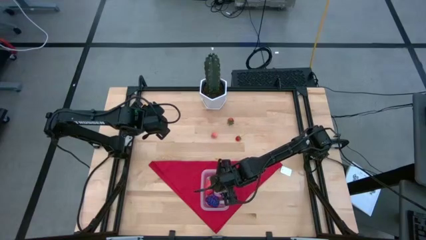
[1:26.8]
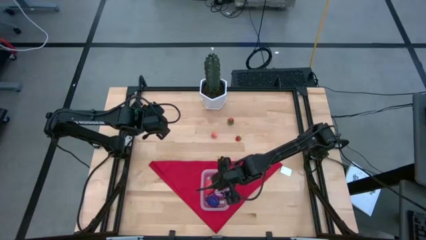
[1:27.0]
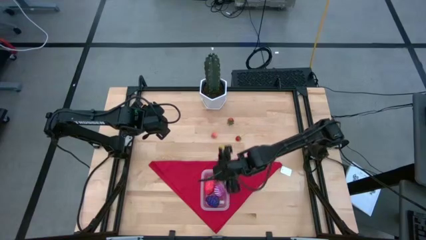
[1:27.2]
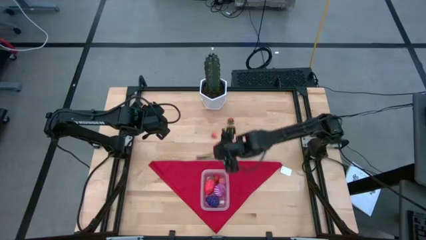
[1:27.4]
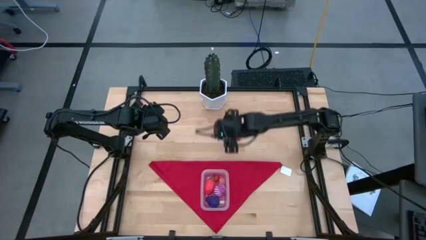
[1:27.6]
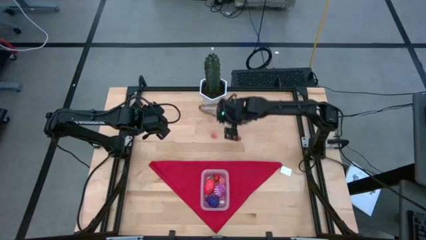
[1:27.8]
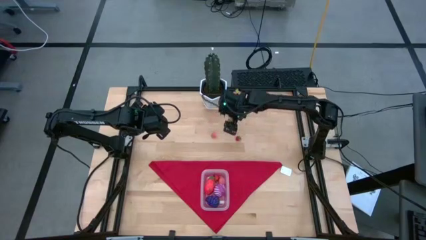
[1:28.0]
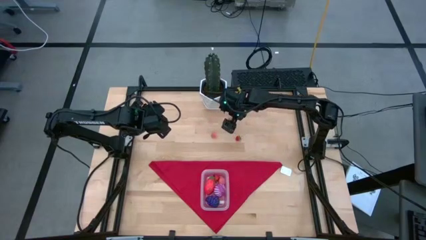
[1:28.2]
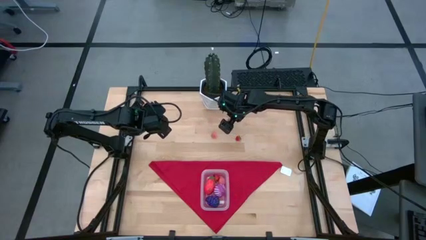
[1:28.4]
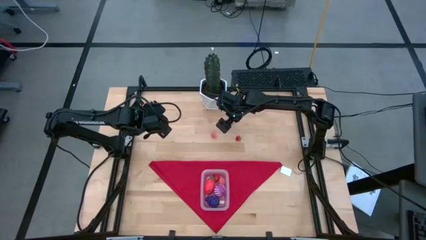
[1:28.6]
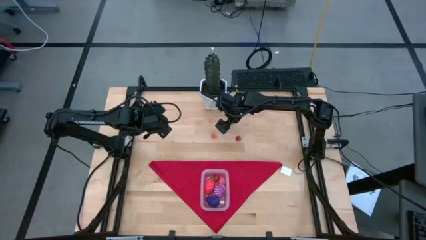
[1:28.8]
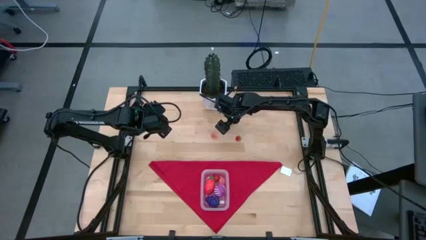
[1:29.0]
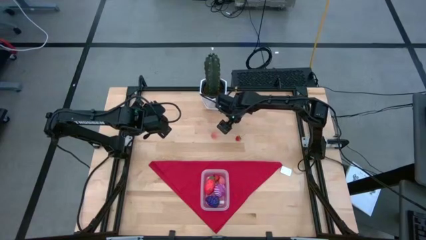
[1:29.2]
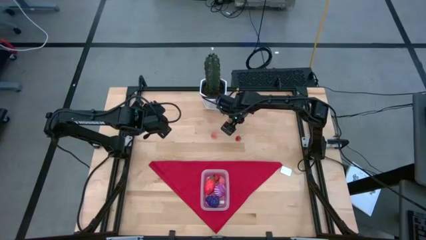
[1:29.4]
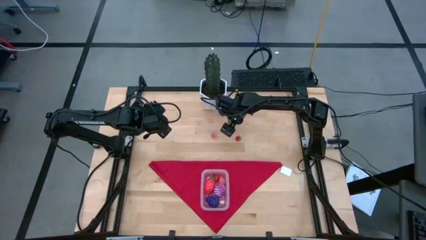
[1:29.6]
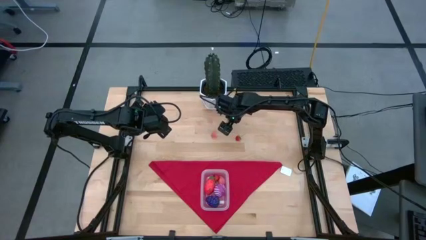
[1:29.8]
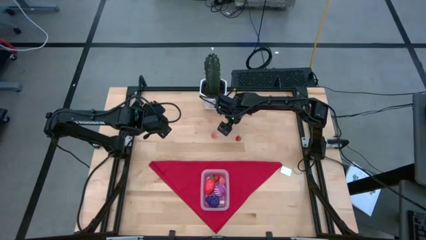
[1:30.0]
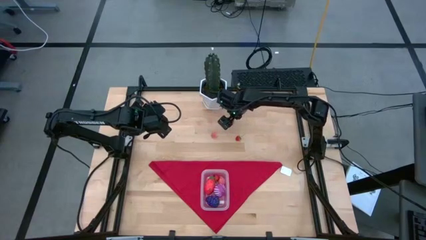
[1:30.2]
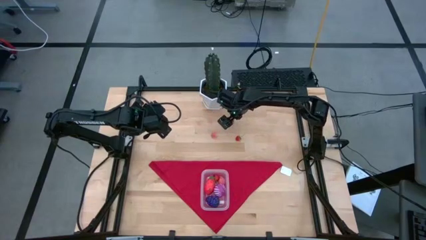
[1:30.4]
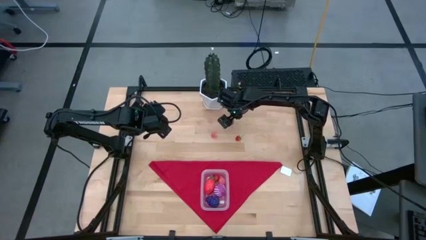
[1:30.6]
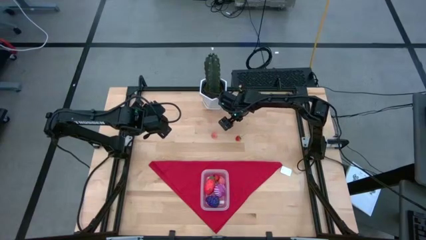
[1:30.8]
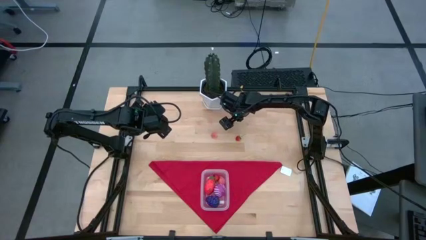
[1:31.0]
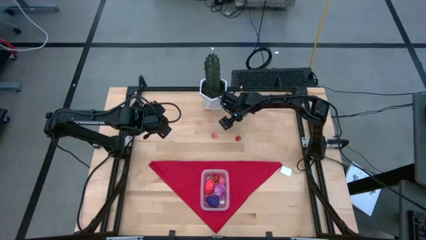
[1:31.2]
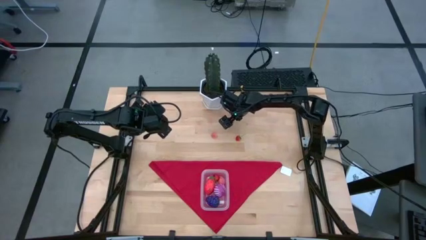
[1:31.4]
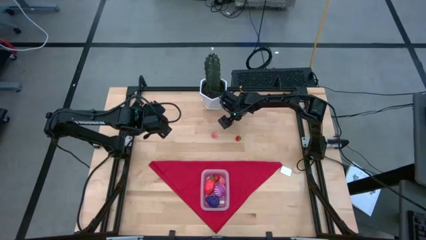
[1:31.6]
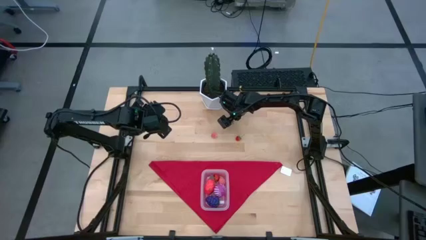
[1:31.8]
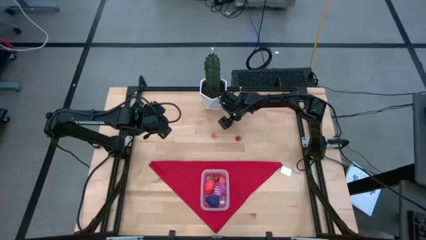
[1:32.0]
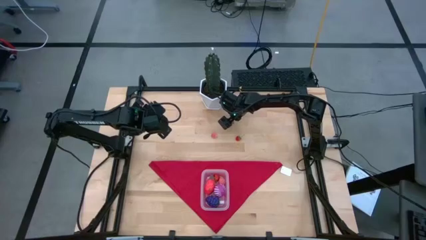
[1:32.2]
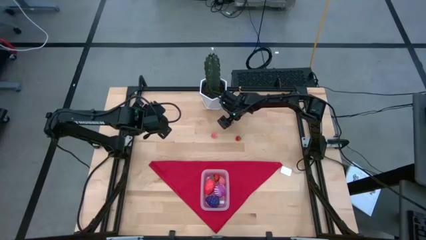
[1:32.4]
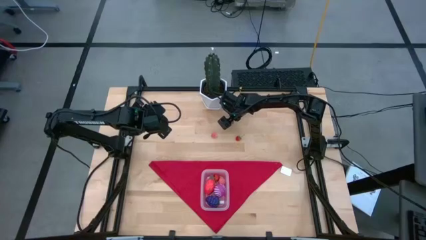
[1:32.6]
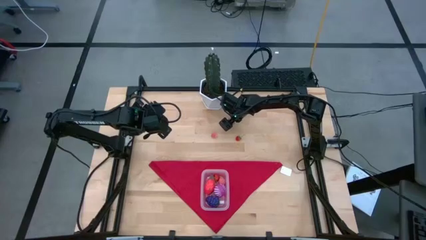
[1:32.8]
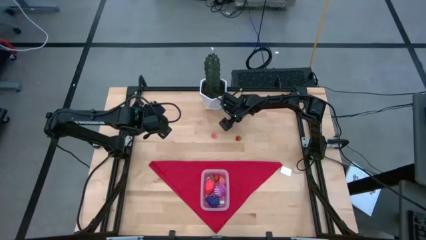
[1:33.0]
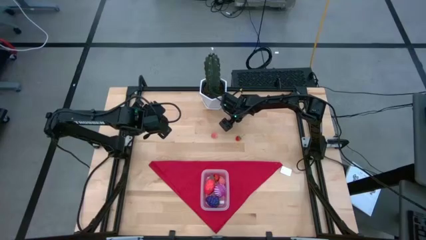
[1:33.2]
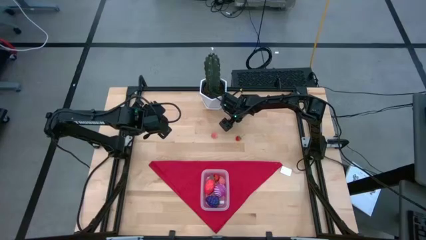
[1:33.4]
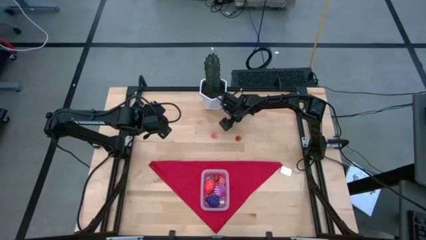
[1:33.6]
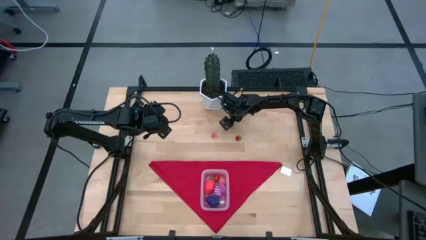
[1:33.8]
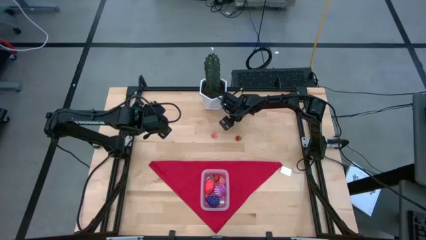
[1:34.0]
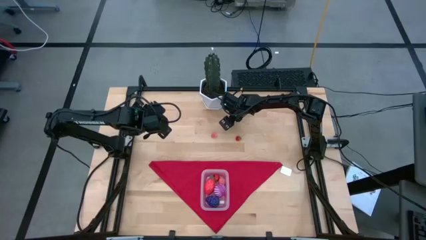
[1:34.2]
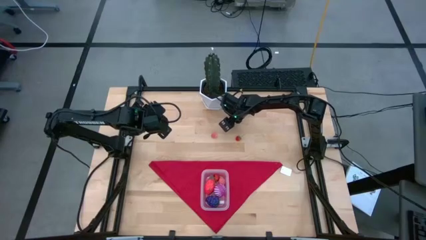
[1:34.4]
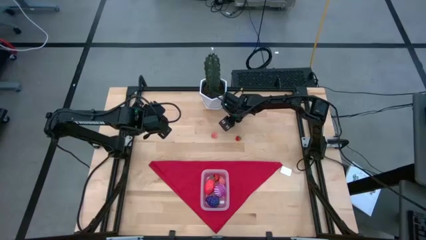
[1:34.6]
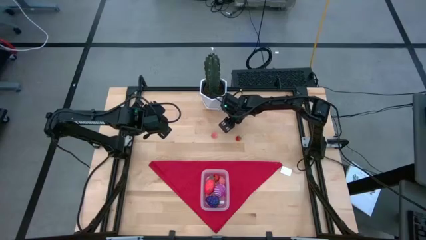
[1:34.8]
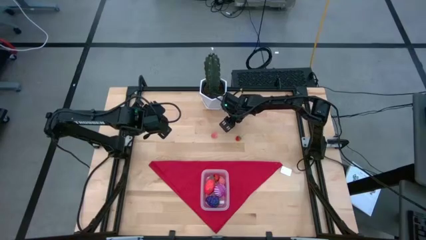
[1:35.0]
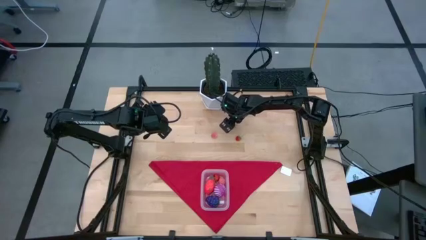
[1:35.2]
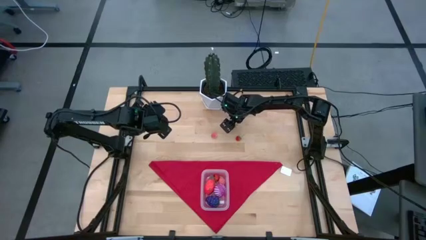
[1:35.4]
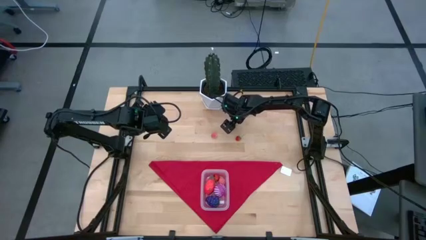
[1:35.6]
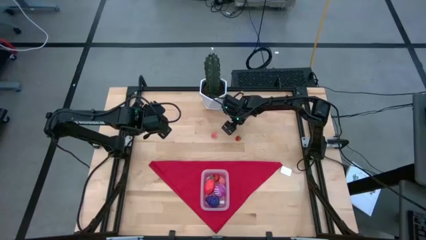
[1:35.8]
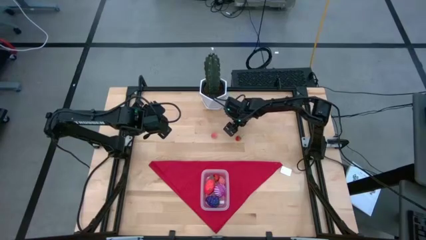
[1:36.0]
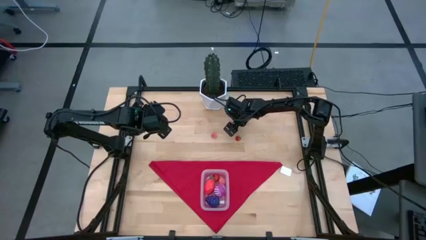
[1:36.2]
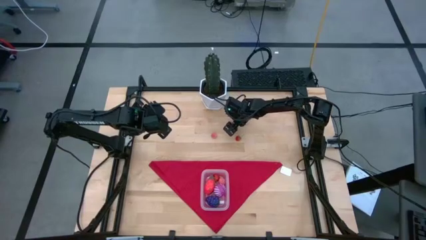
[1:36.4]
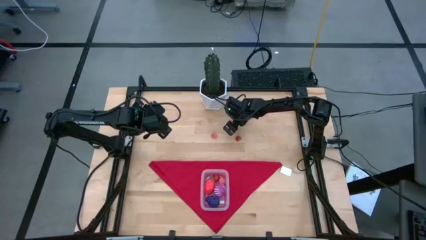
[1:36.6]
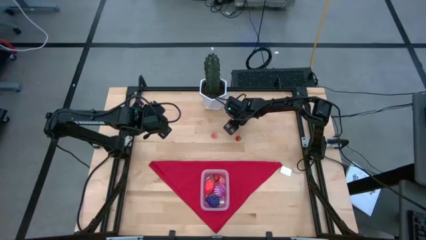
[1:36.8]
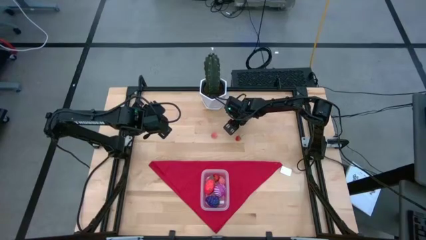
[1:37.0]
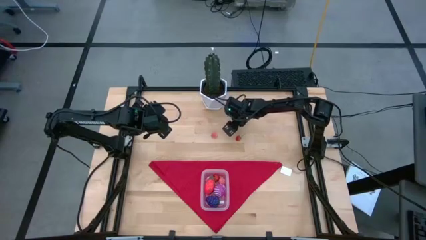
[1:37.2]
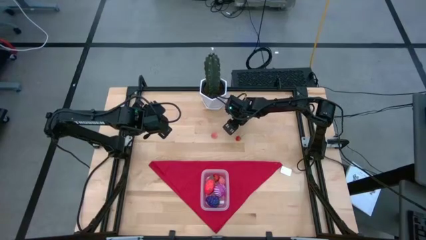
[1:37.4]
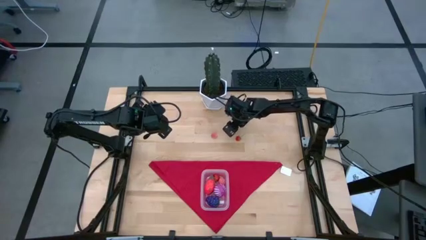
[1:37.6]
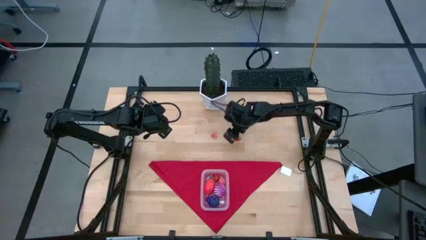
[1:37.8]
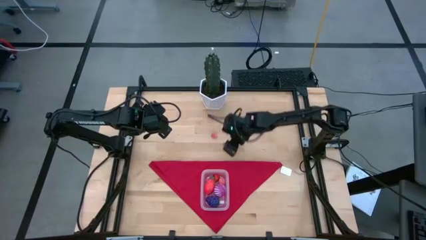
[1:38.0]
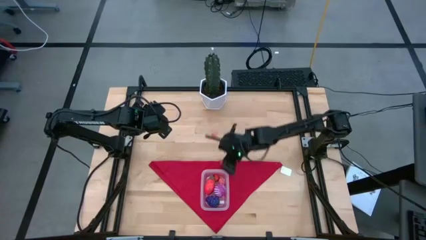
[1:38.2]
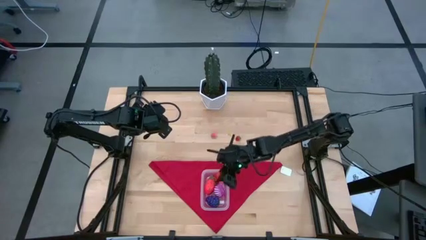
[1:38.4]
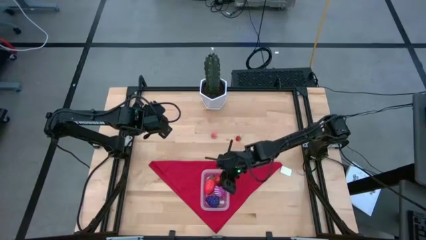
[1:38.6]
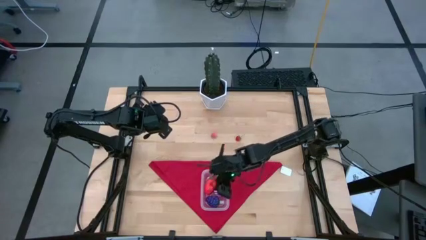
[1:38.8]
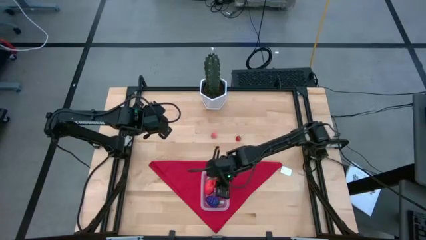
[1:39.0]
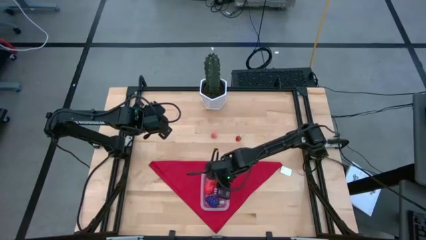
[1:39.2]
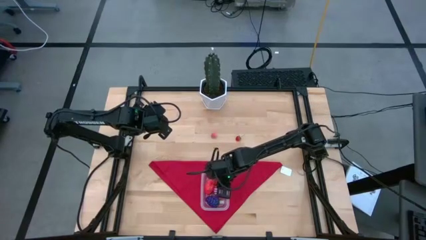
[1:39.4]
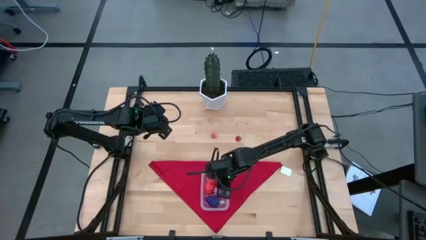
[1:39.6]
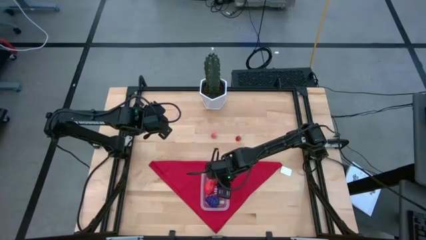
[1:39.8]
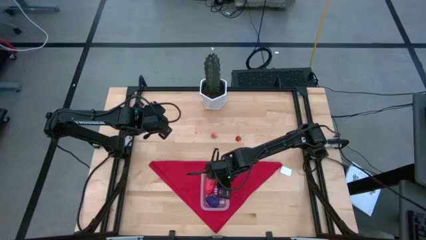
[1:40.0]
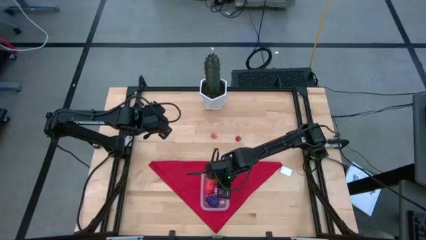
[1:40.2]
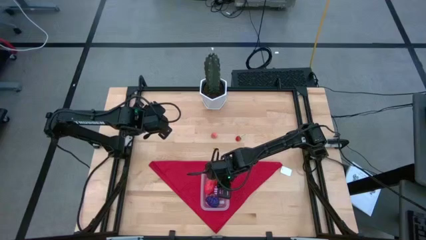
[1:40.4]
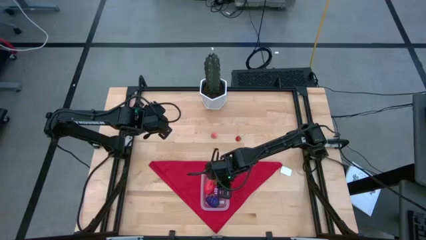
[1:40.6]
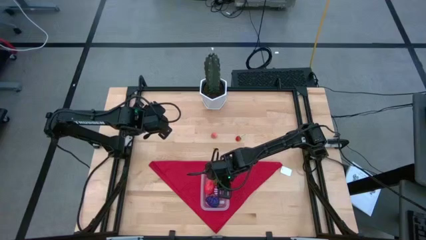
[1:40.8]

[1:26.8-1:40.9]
Task: Pick and placing Produce into tupperware
Put the top strawberry into the transparent bin
